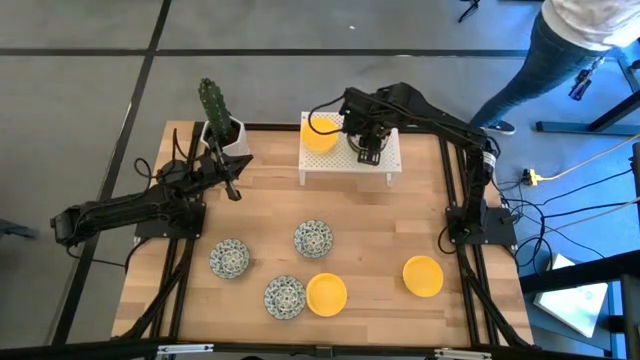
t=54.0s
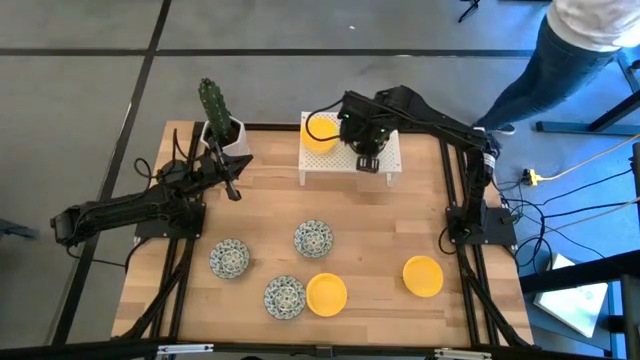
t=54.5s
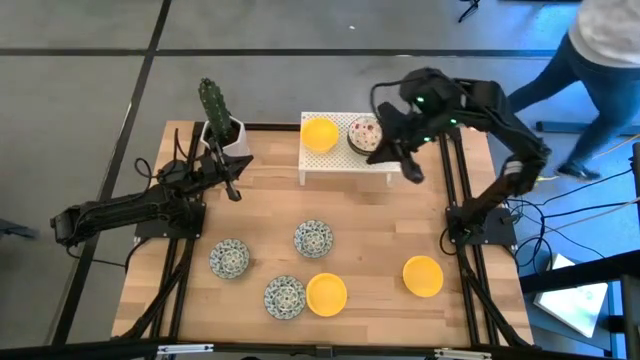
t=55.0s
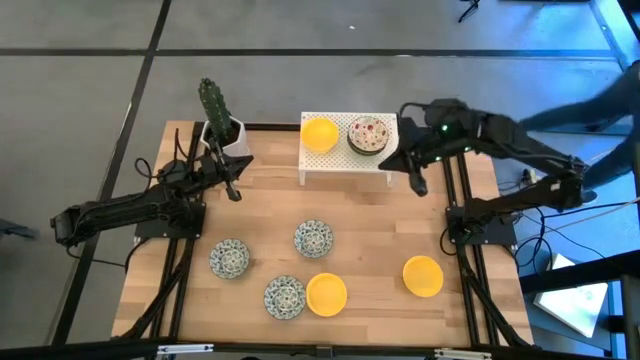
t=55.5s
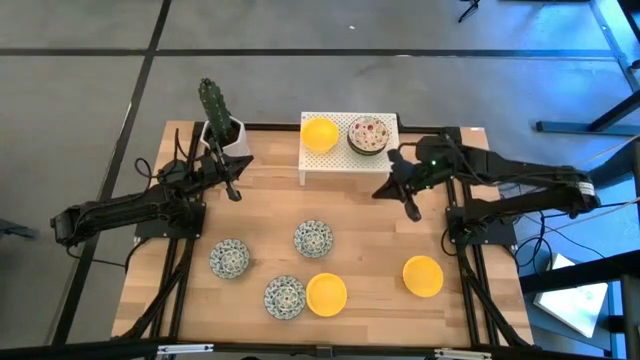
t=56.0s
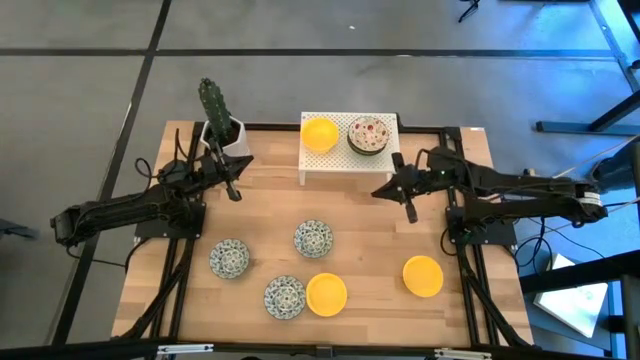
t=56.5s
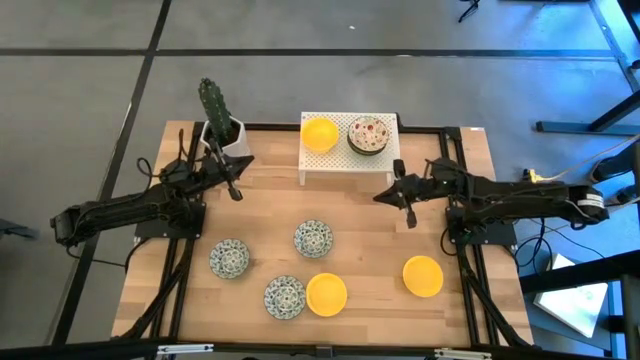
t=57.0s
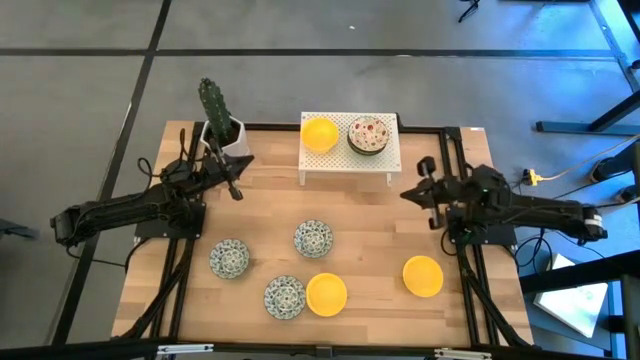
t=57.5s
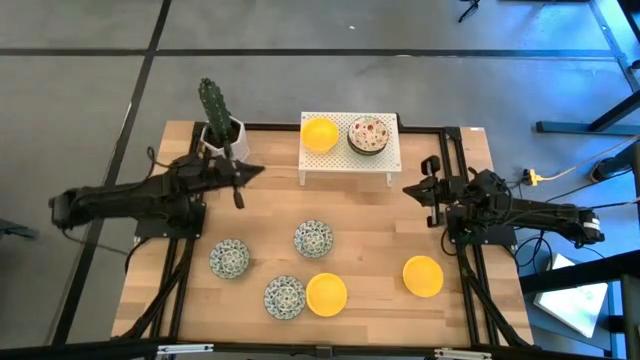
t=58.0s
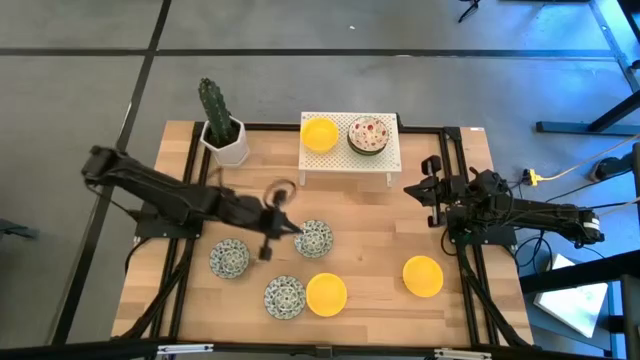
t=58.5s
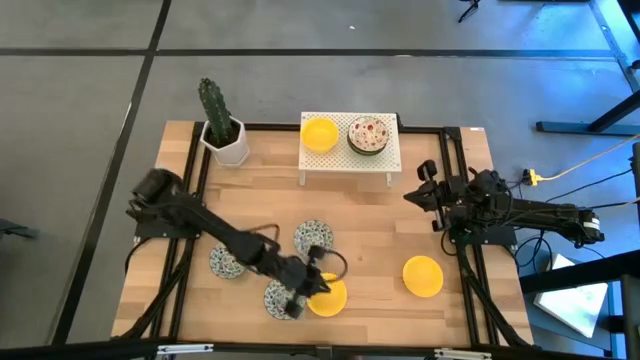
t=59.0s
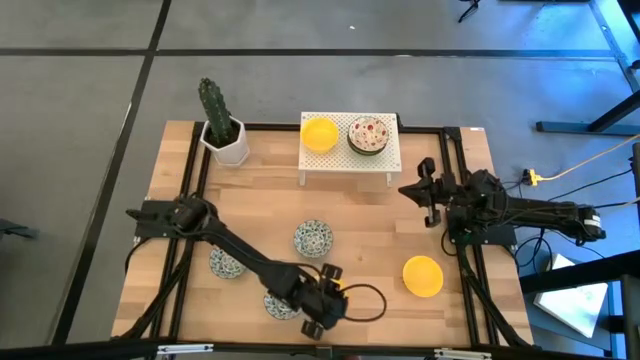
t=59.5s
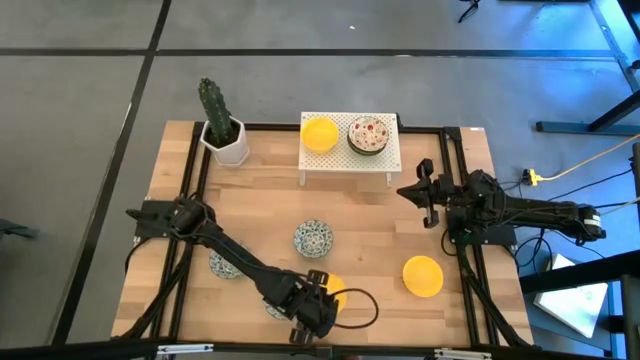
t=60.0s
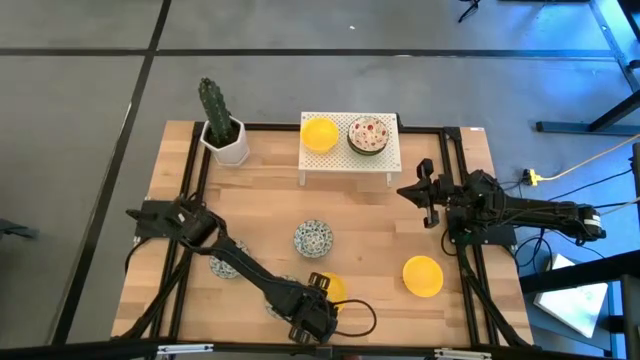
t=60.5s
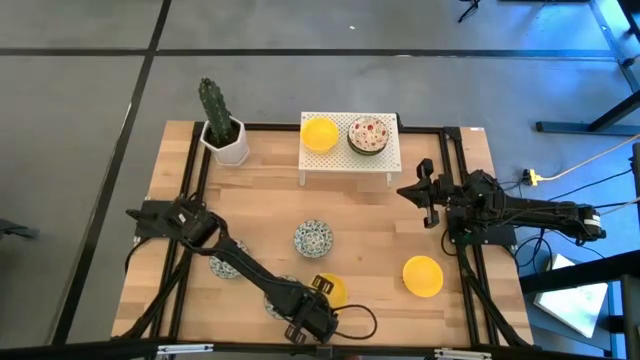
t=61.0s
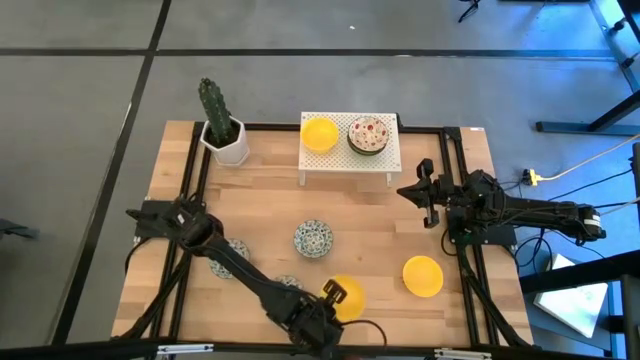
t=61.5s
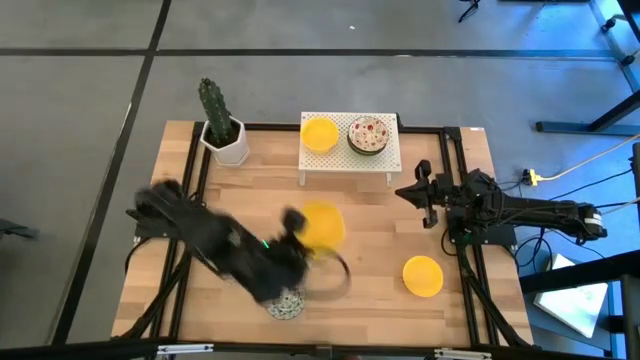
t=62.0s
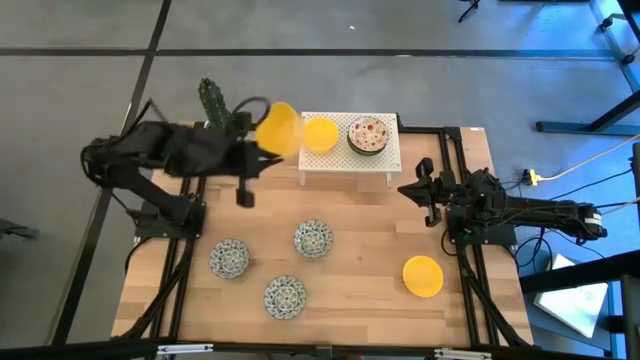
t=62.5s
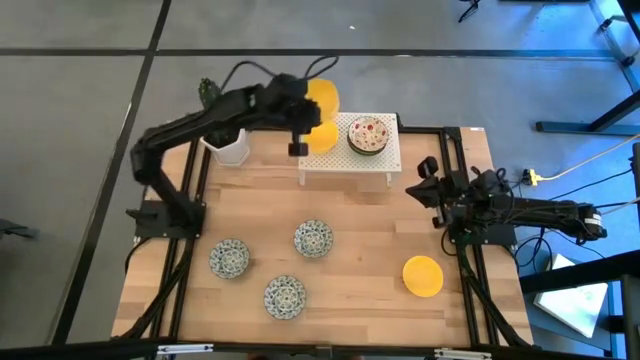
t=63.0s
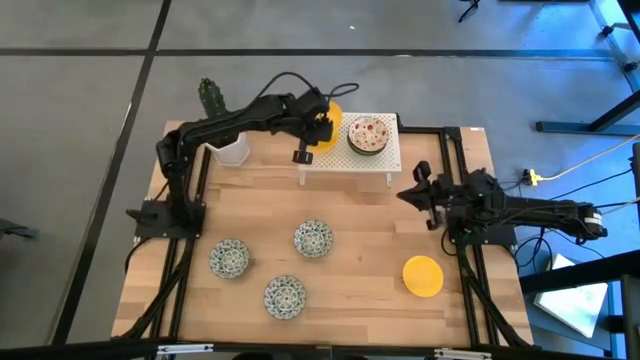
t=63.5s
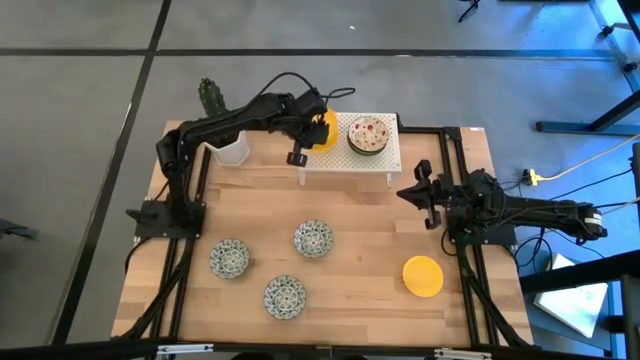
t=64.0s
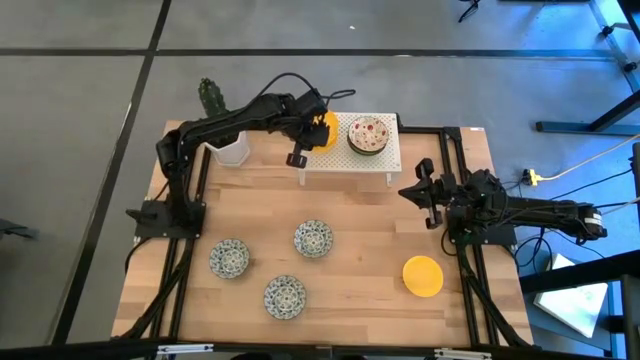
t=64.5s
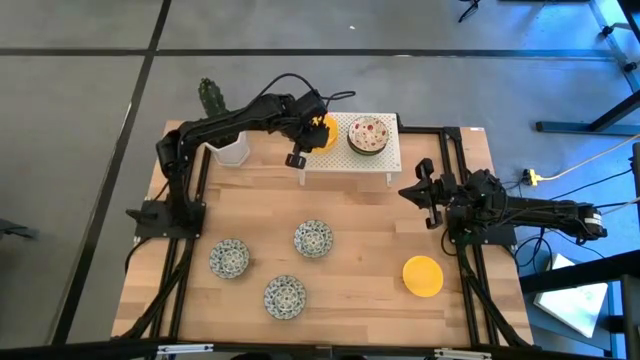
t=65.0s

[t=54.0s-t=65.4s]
Task: Pick & Place Mini bowls
Stack the left yellow bowl on top of the yellow bowl on the shelf

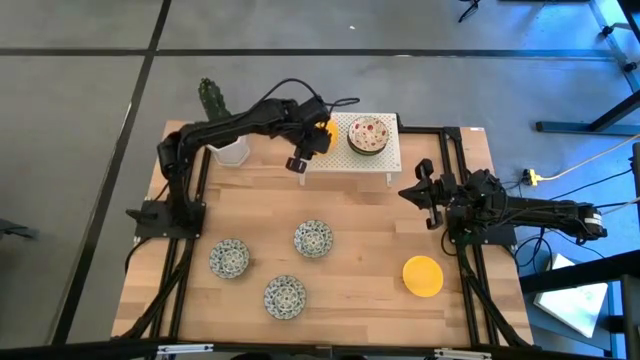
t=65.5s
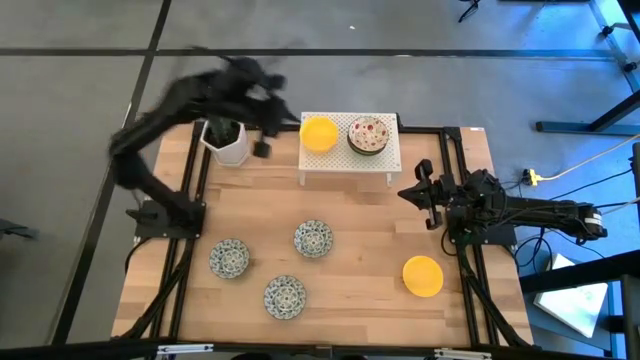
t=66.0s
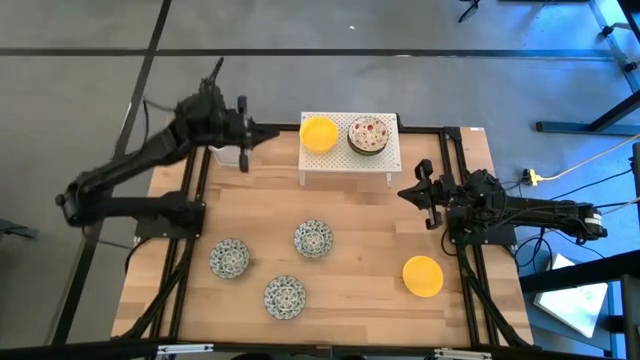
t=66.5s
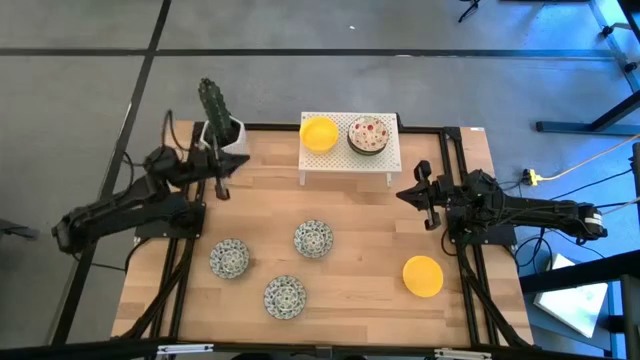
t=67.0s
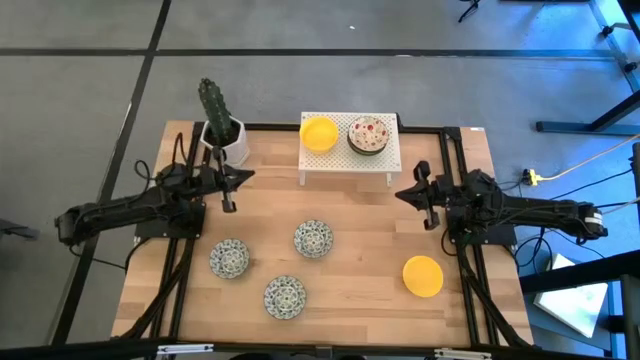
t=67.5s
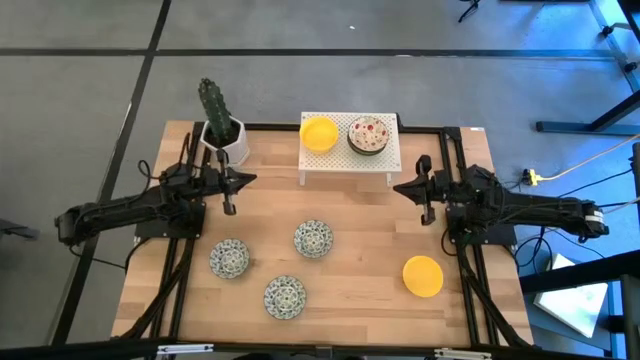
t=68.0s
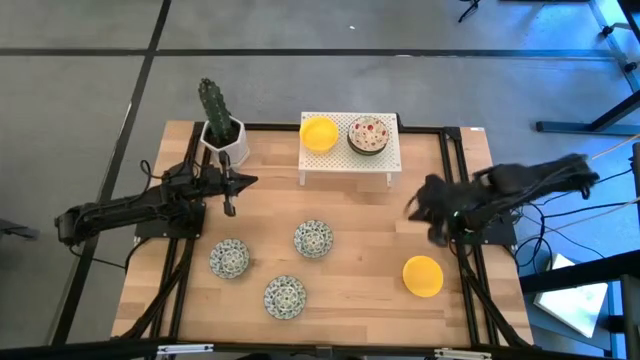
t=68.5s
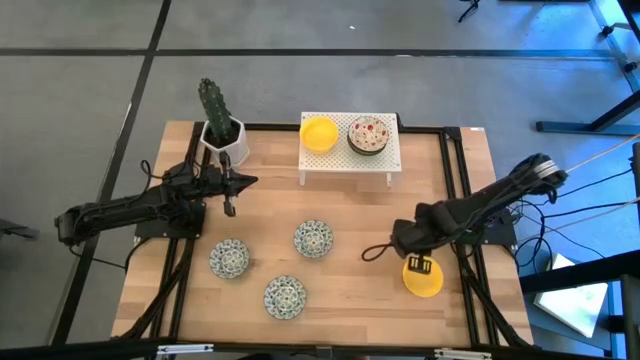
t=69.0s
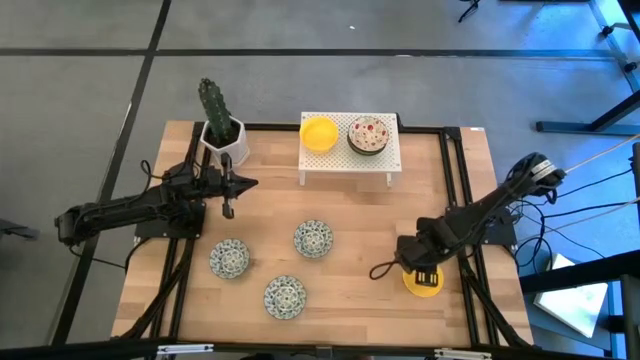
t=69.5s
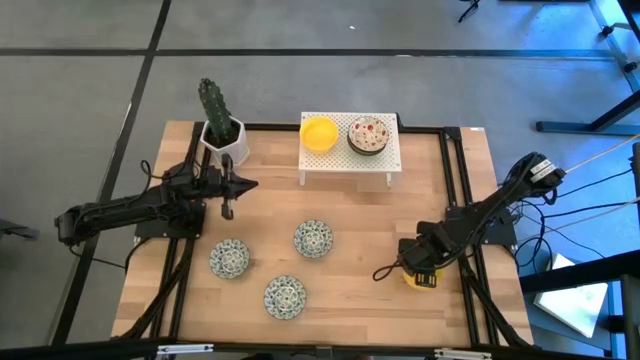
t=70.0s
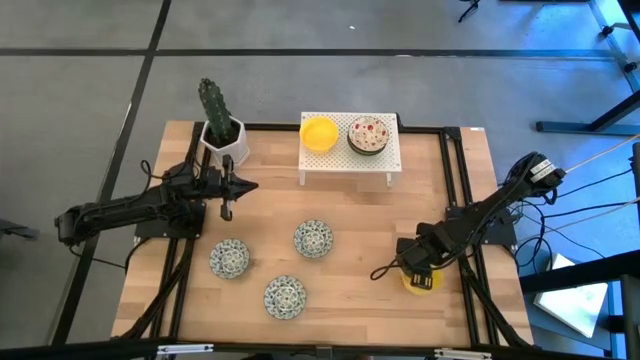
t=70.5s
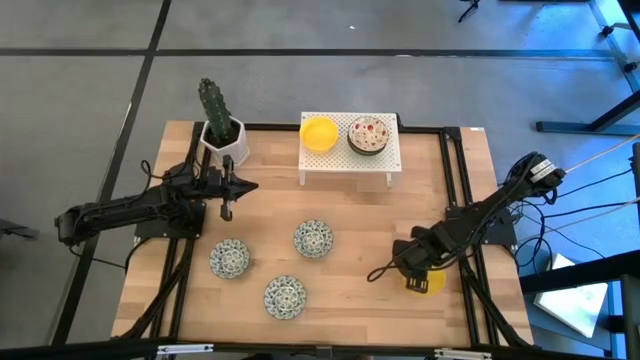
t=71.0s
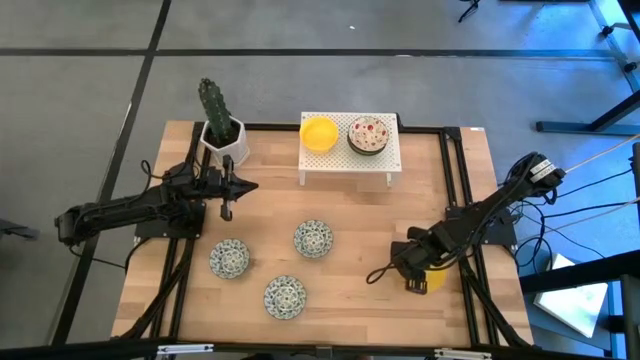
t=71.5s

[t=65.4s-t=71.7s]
Stack the yellow bowl on top of the yellow bowl on the shelf

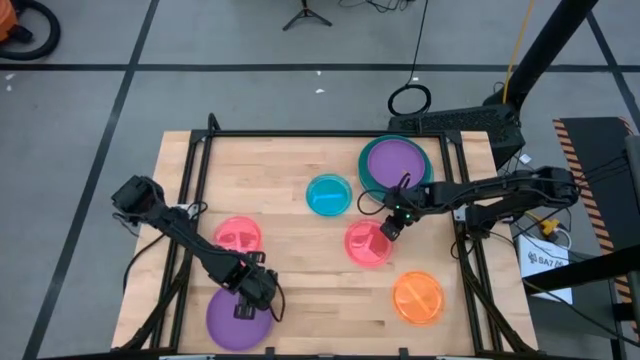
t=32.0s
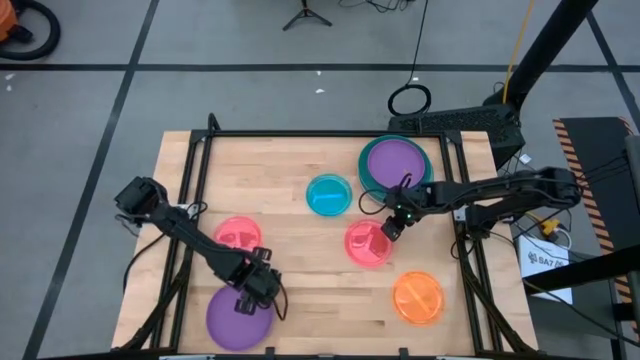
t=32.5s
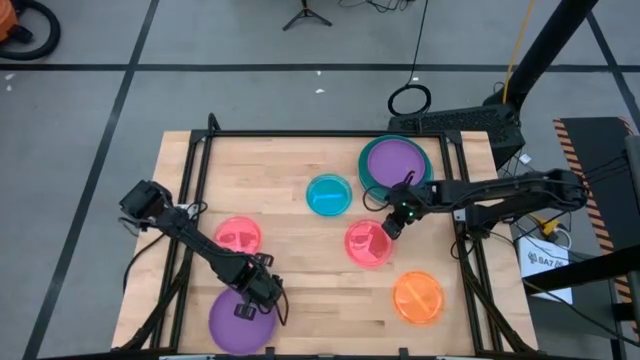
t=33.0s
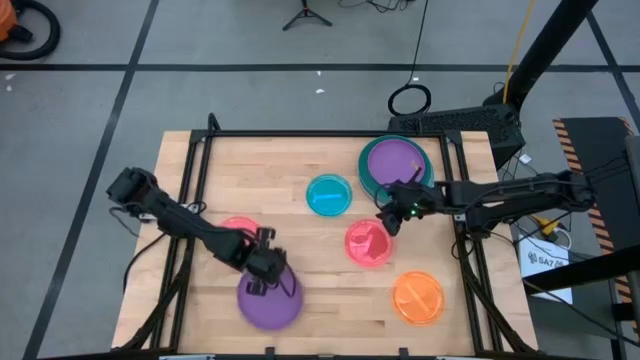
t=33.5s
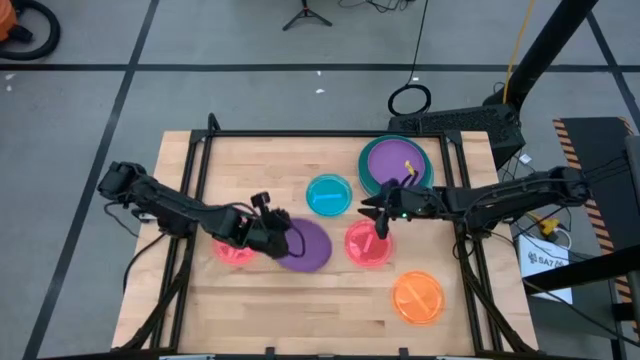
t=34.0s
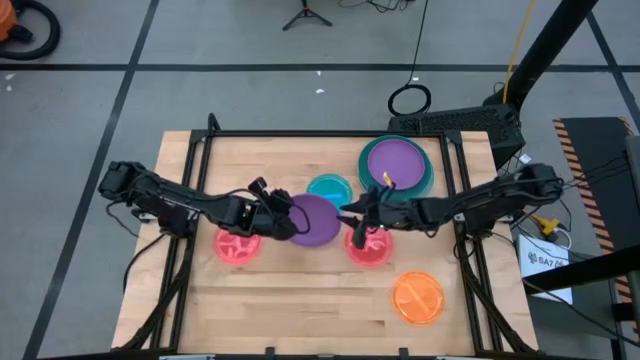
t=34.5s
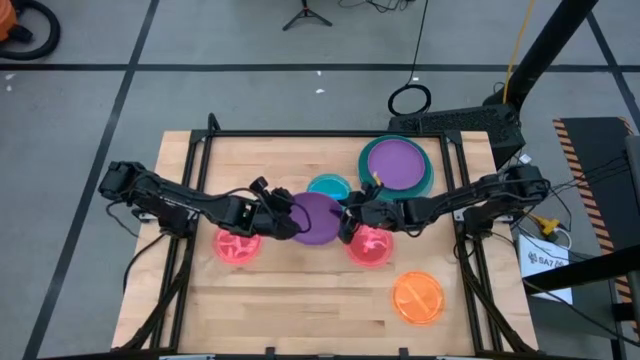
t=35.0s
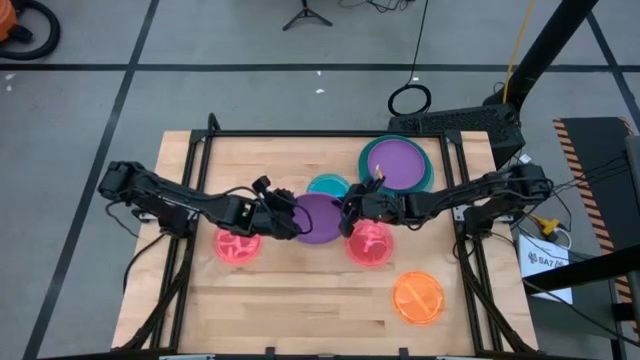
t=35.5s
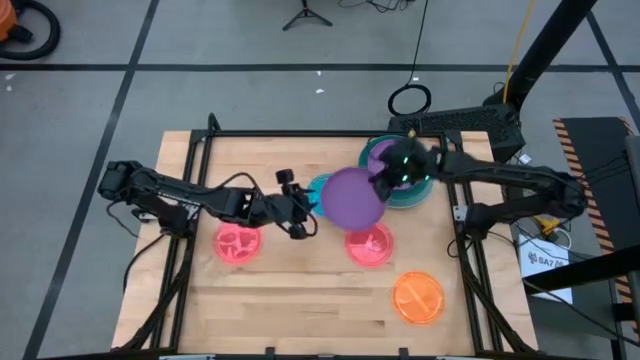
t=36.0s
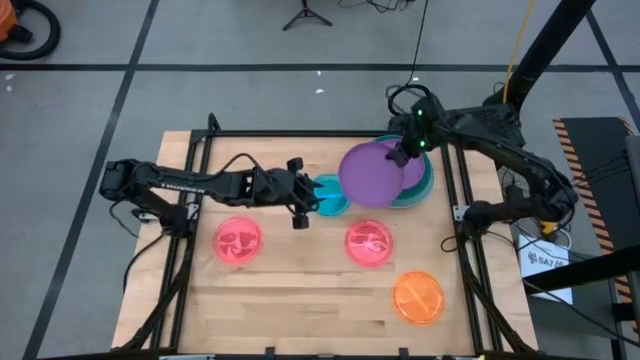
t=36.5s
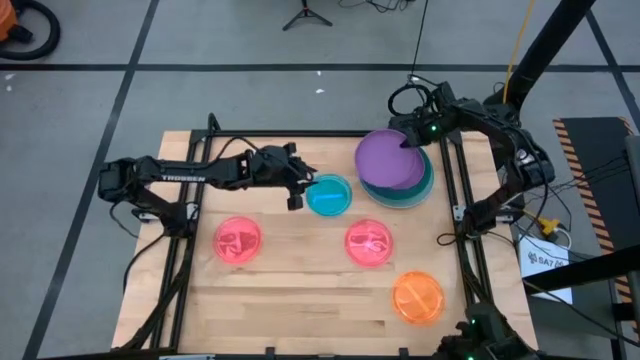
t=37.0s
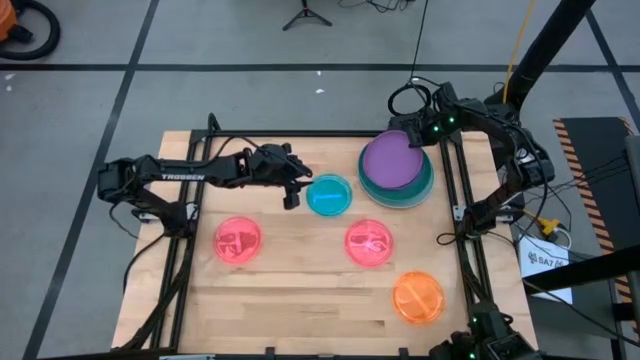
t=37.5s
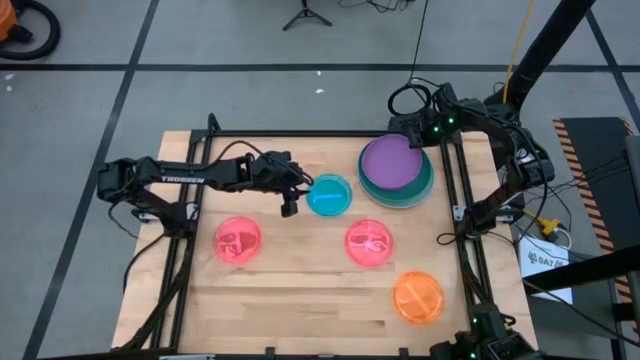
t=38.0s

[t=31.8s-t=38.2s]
Task: Stack plastic plates
Stack the purple plate on top of the other purple plate
